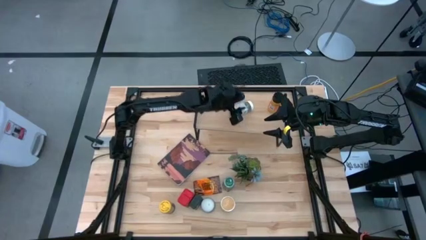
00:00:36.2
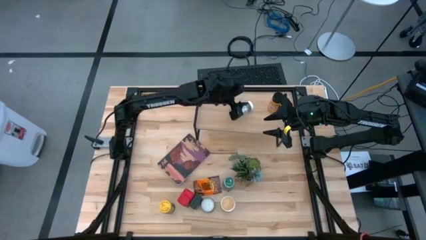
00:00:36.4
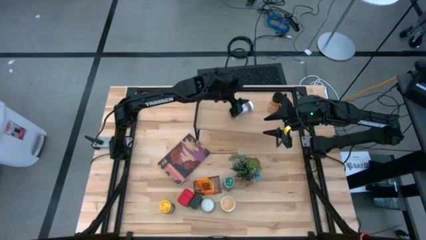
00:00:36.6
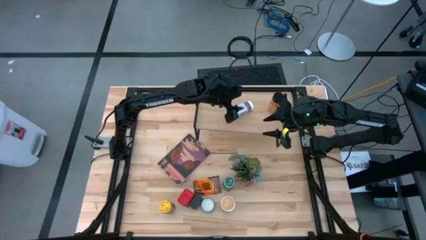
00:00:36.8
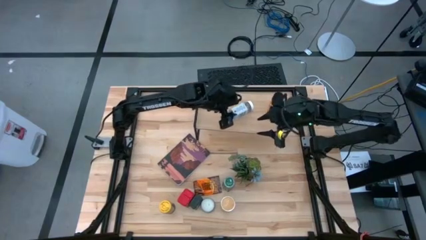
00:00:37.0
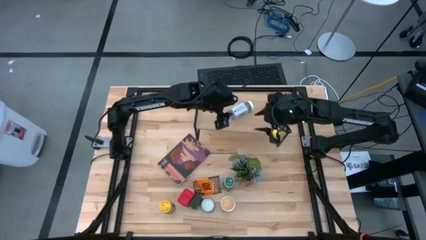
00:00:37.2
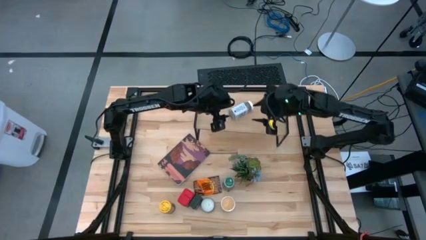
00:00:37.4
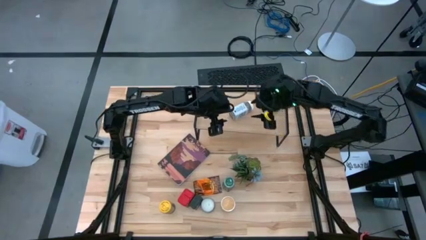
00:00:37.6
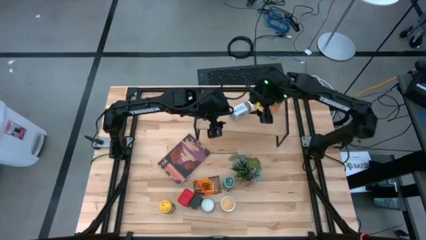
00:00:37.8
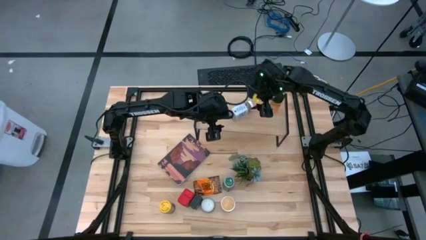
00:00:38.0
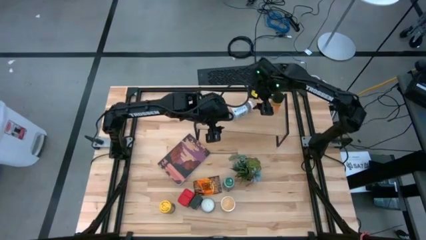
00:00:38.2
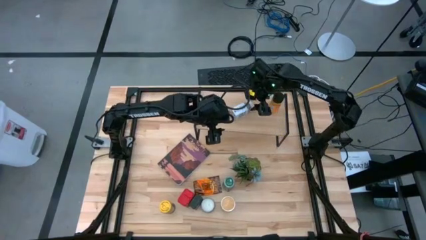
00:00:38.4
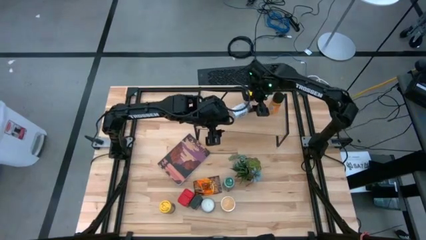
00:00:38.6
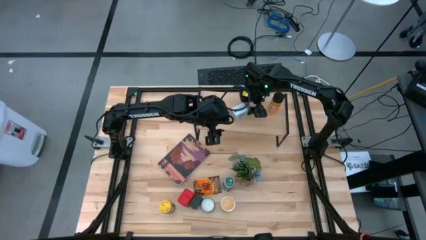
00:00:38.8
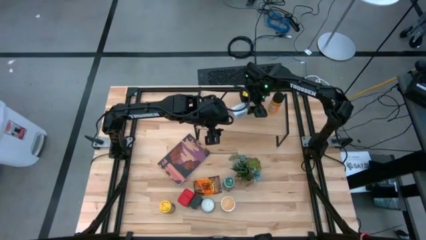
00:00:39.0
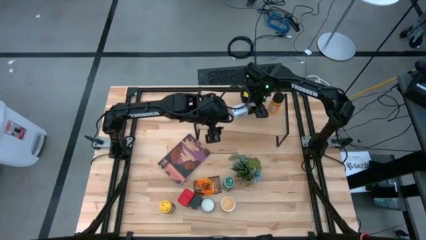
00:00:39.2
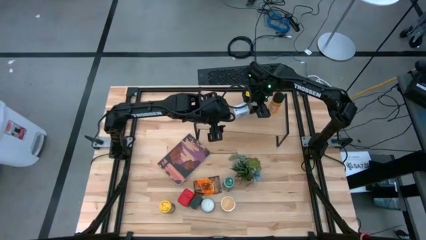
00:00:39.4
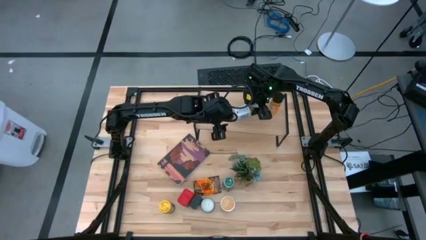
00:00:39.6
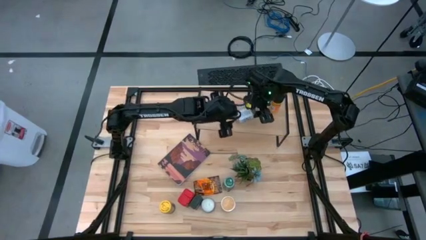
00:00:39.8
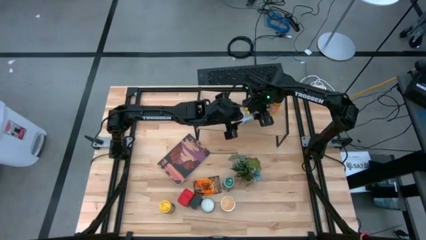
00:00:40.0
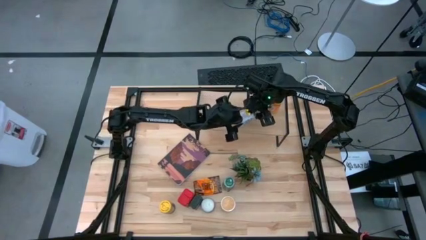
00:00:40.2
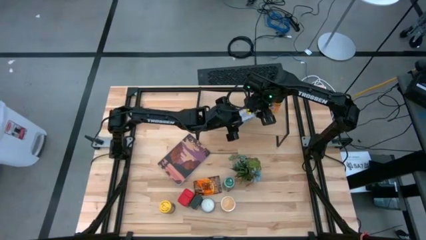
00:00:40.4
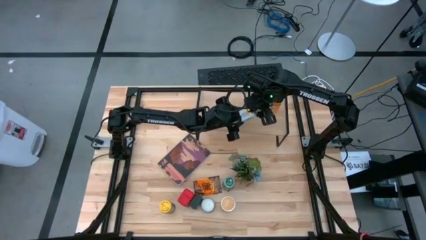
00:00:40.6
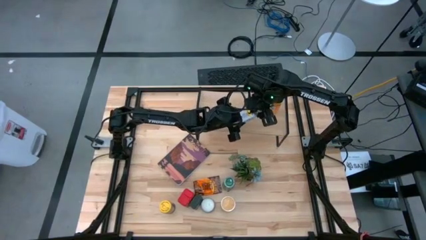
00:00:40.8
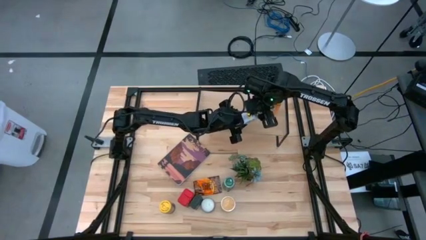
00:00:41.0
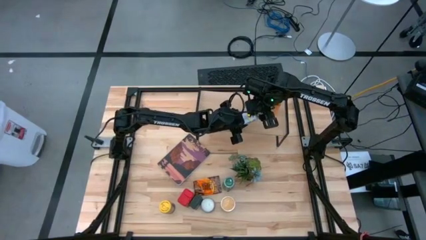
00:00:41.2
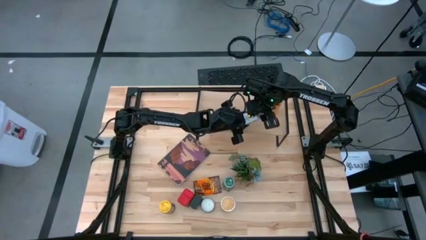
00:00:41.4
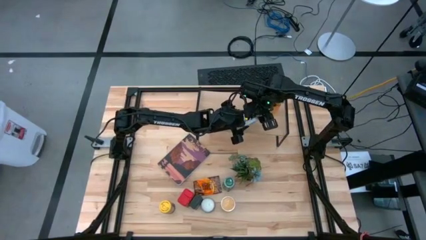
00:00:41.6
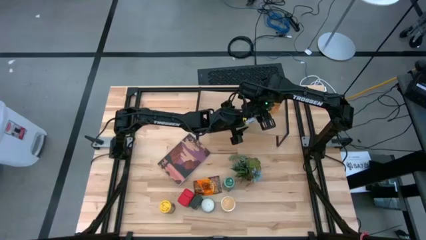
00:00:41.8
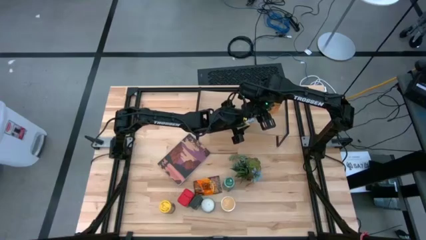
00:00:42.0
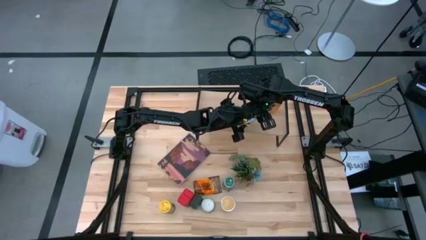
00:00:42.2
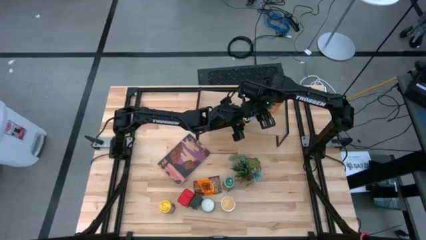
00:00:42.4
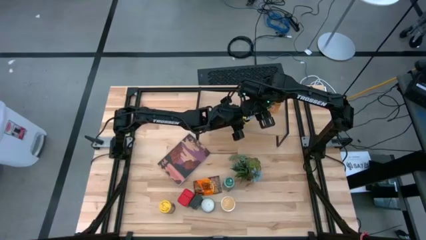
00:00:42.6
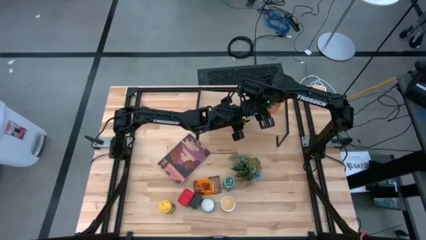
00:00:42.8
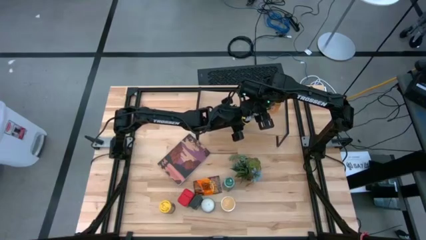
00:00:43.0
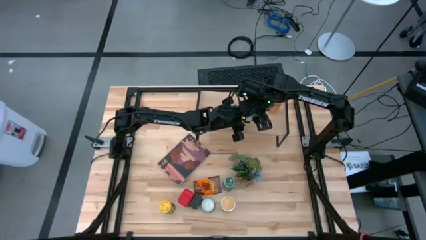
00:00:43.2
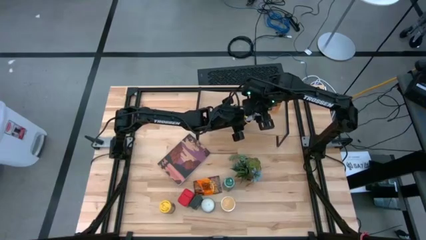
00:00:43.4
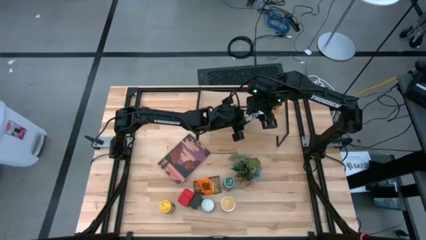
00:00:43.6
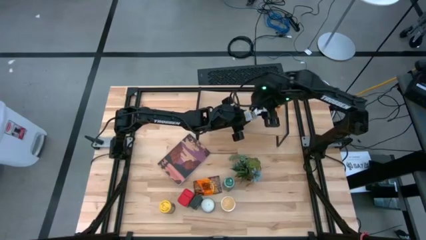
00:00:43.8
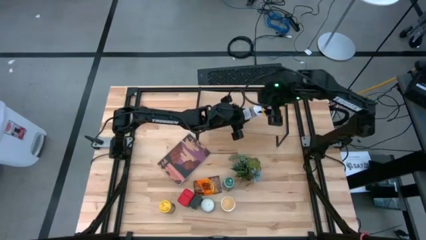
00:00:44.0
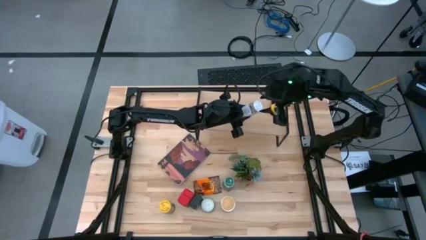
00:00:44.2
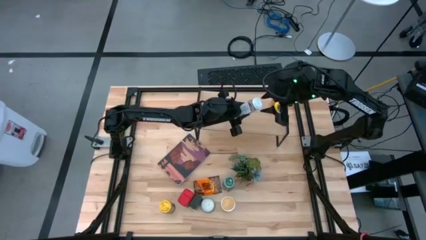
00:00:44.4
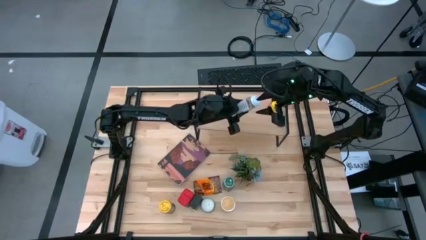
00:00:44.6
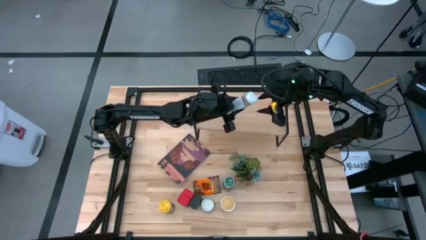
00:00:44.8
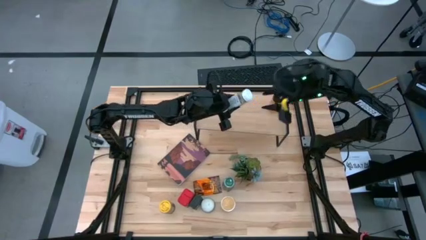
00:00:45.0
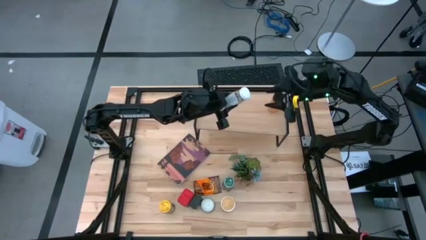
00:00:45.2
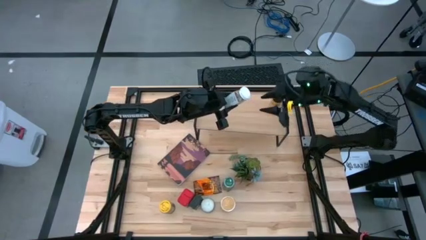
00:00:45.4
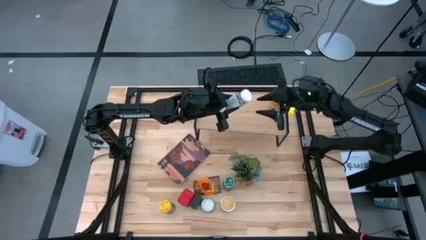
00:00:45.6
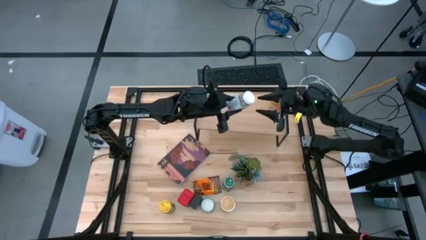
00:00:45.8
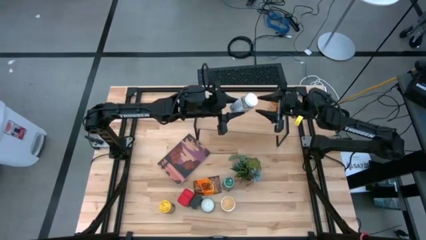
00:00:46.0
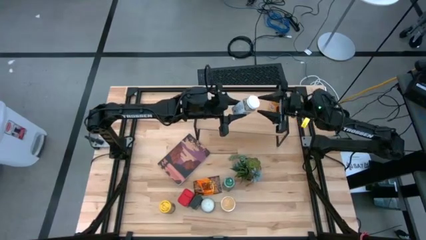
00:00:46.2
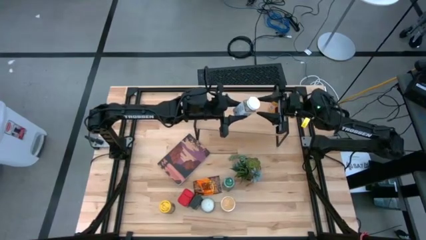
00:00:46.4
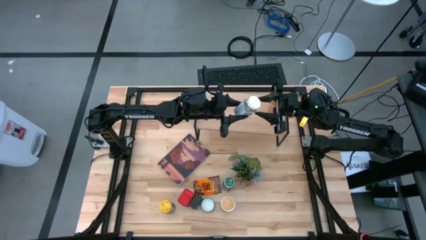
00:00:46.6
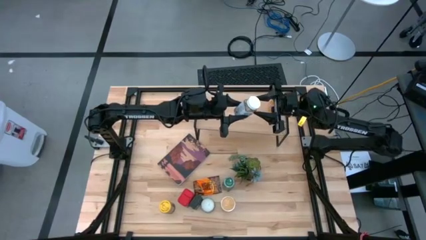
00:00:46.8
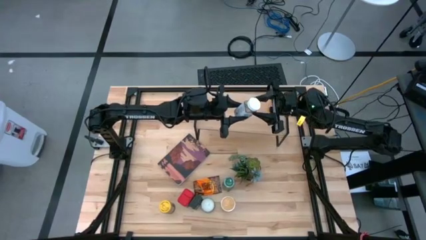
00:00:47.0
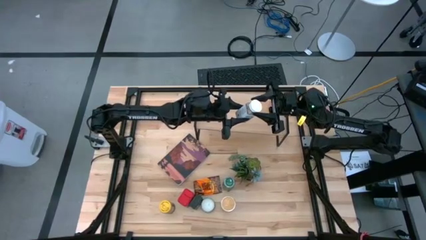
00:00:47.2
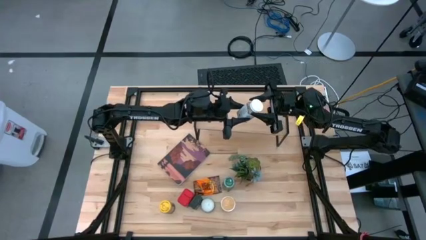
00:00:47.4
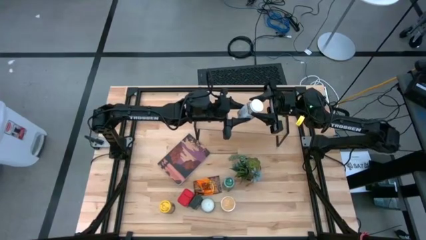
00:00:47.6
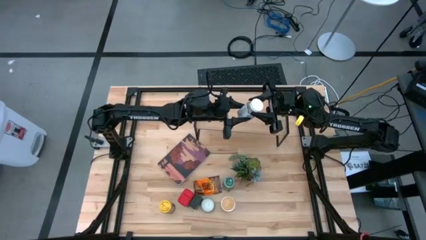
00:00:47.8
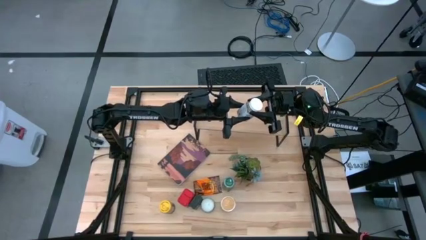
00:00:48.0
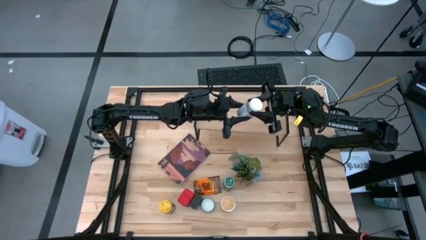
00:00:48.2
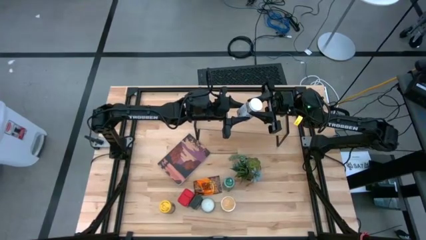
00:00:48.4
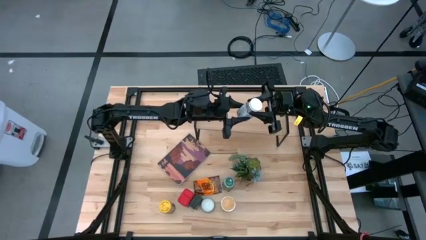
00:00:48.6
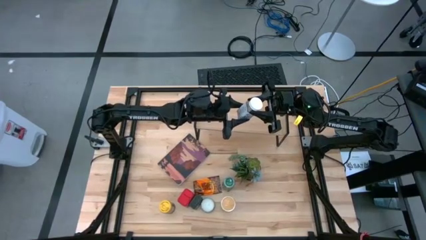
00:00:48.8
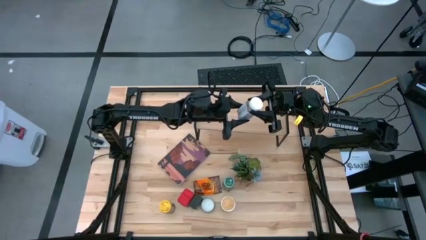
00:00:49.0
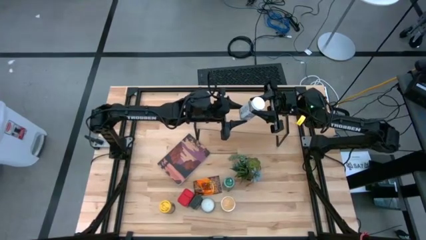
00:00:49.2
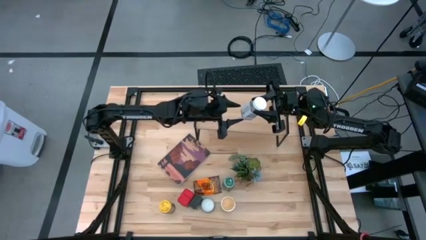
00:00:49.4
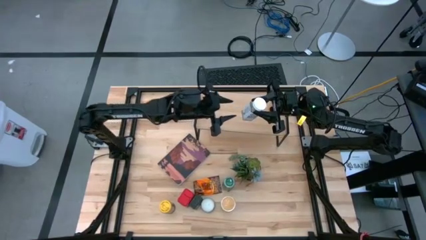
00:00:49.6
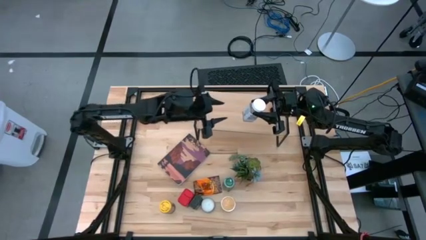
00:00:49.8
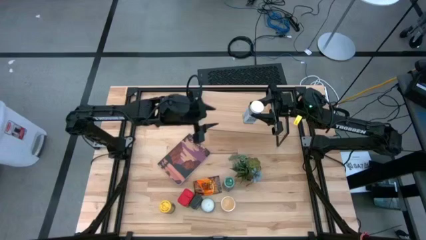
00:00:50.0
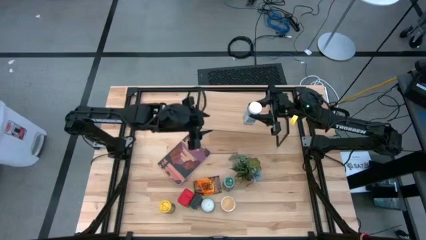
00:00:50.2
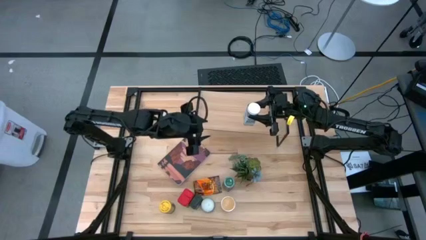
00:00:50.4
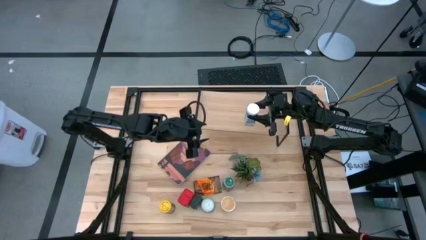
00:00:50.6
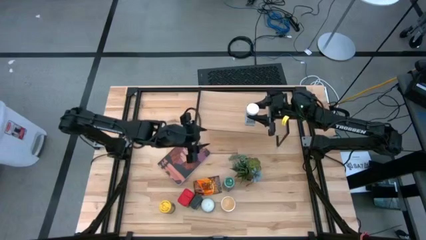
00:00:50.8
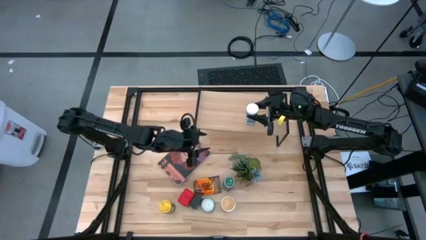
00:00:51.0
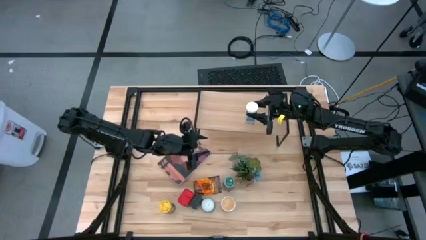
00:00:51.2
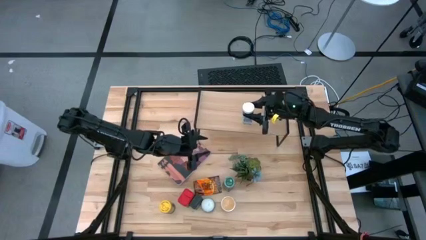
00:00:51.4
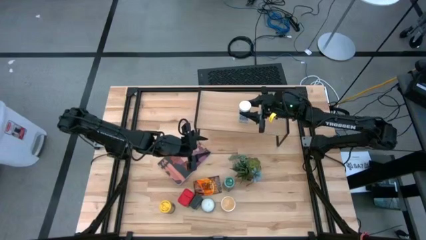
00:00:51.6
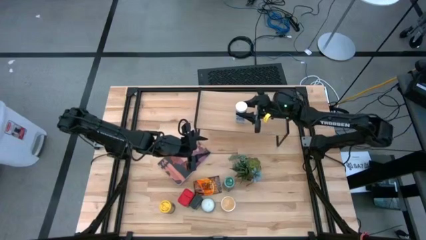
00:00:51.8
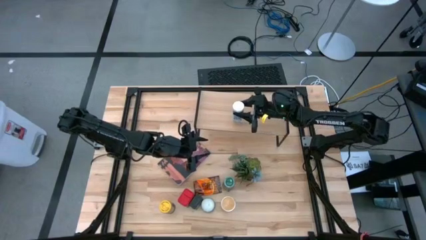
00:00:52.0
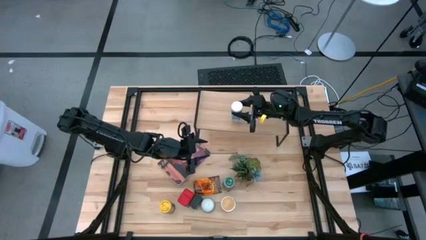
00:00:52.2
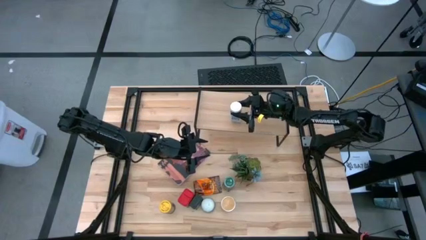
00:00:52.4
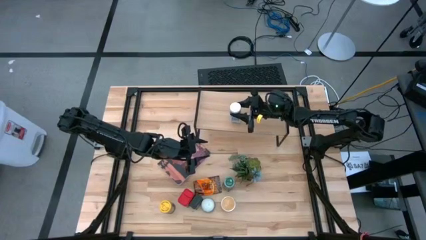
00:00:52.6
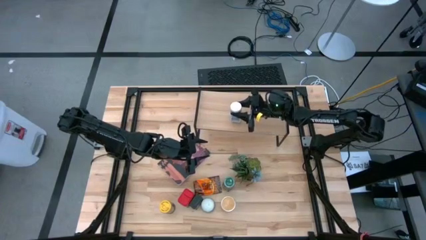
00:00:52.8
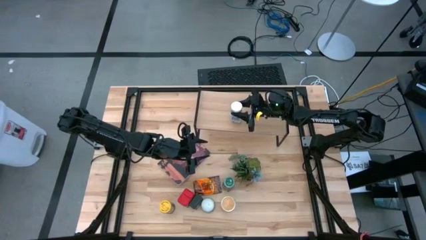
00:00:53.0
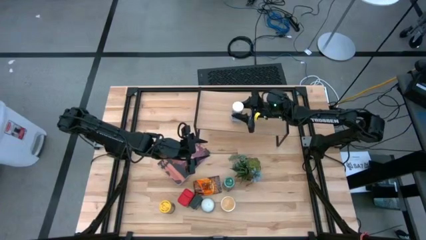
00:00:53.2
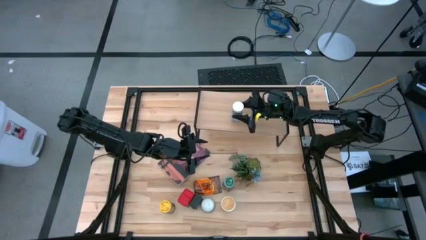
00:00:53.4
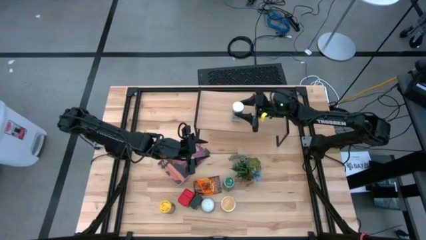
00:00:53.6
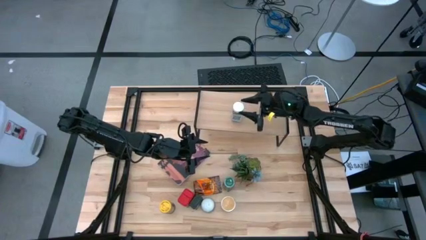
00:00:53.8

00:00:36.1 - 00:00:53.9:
Task: Shelf spices
Put the white seasoning bottle on the shelf
